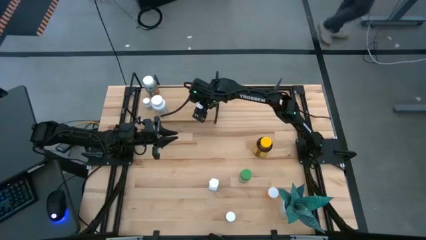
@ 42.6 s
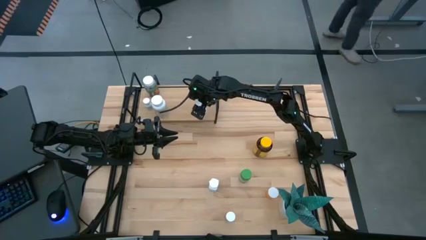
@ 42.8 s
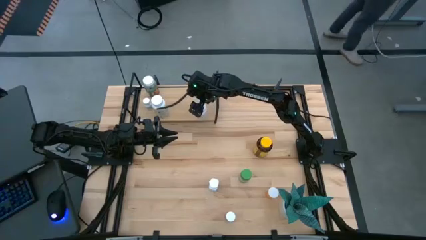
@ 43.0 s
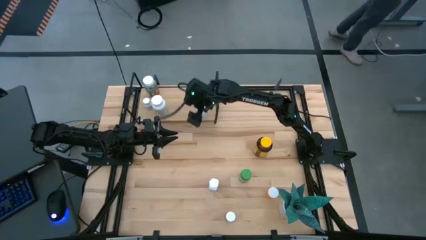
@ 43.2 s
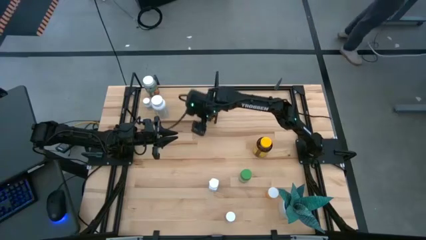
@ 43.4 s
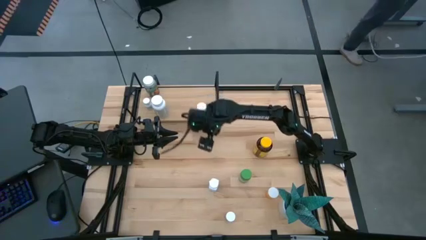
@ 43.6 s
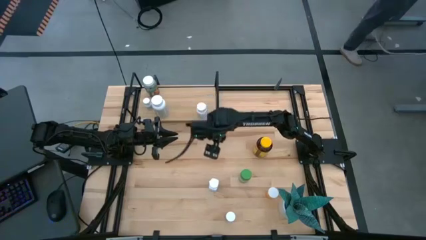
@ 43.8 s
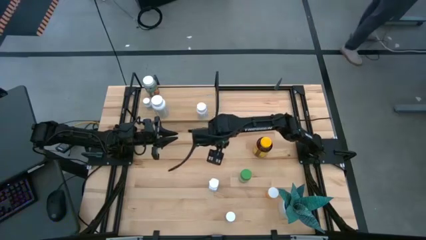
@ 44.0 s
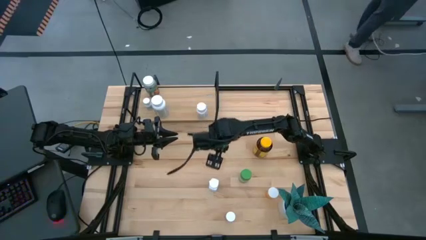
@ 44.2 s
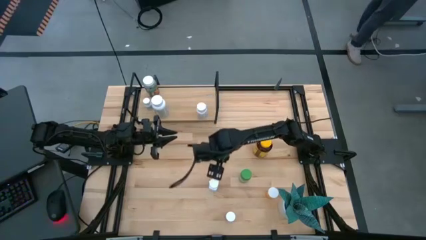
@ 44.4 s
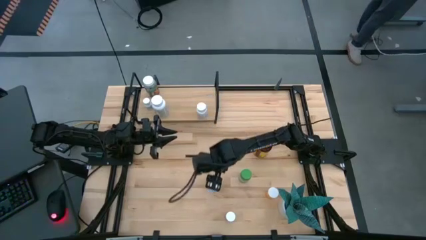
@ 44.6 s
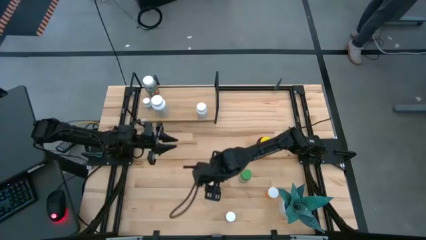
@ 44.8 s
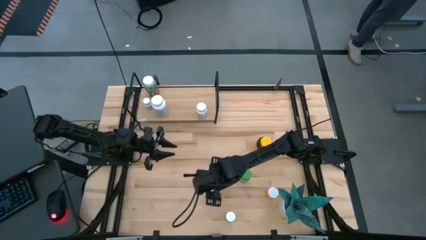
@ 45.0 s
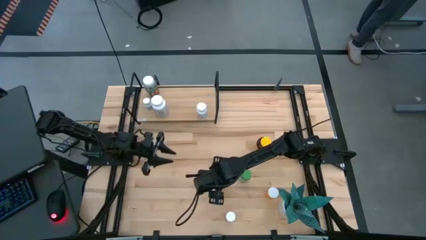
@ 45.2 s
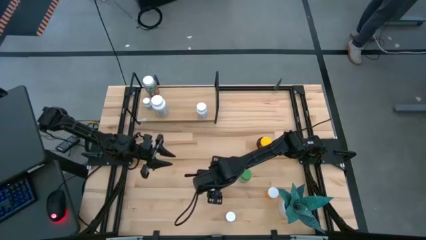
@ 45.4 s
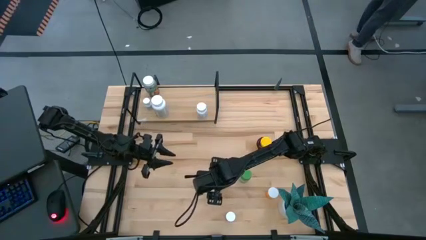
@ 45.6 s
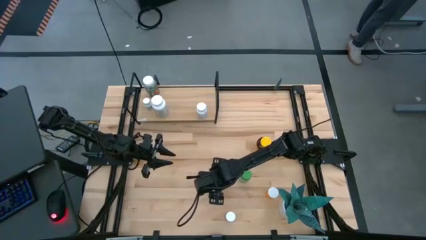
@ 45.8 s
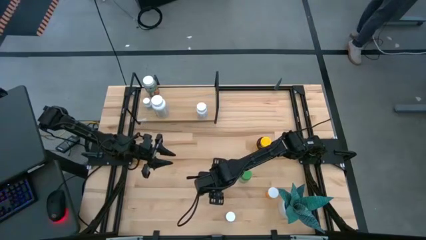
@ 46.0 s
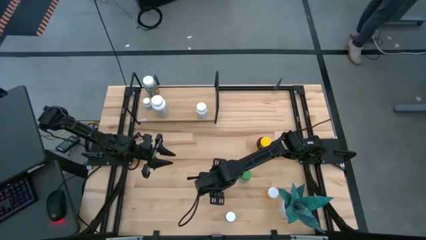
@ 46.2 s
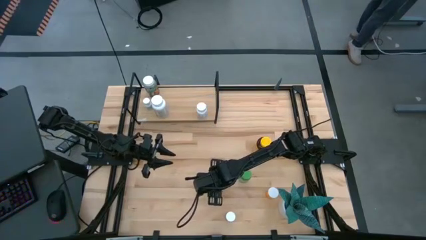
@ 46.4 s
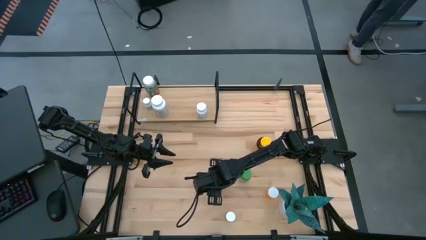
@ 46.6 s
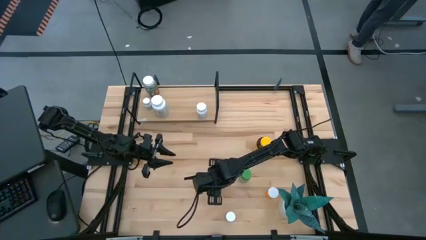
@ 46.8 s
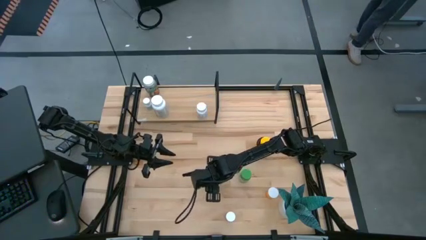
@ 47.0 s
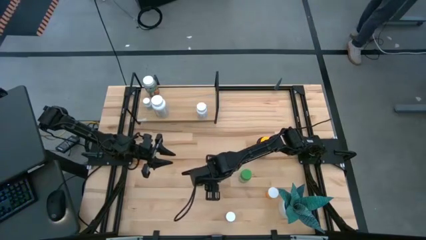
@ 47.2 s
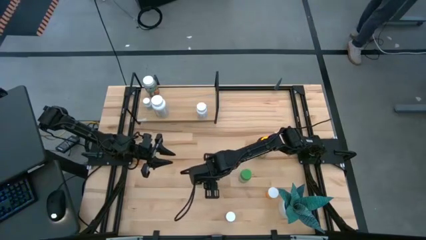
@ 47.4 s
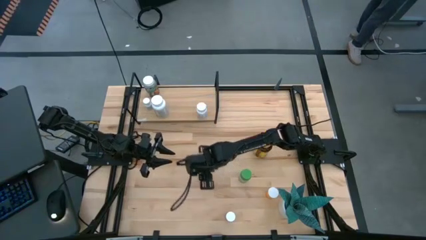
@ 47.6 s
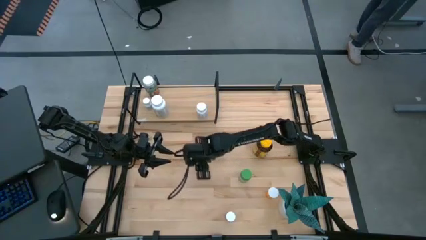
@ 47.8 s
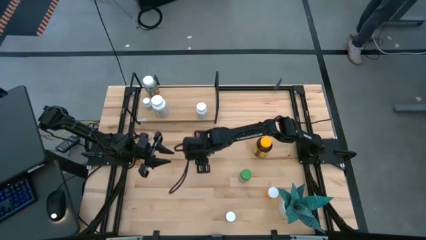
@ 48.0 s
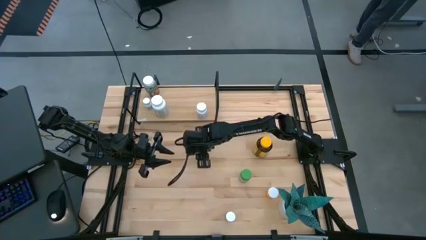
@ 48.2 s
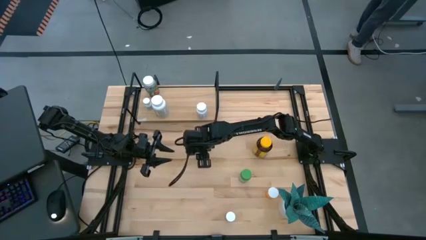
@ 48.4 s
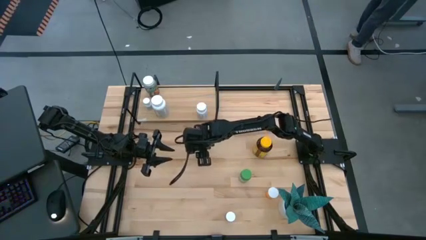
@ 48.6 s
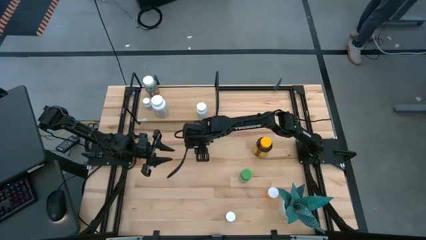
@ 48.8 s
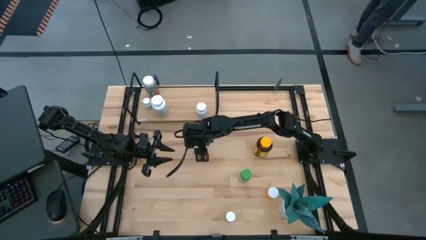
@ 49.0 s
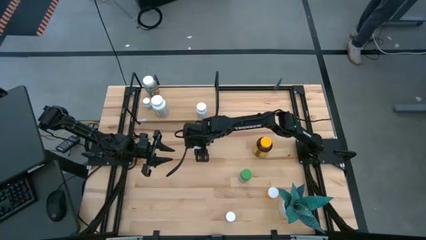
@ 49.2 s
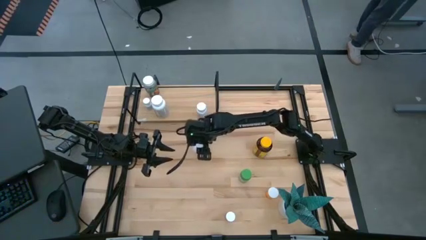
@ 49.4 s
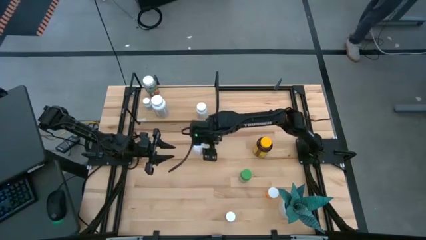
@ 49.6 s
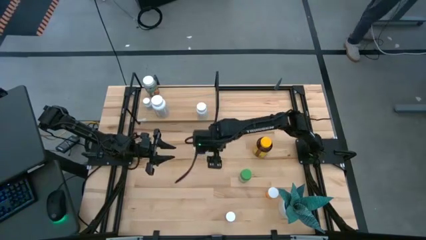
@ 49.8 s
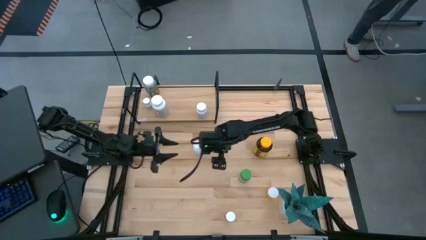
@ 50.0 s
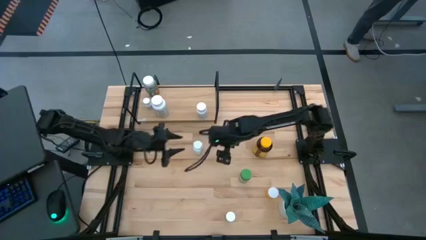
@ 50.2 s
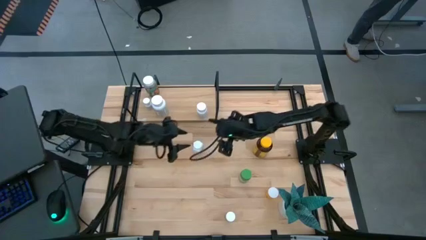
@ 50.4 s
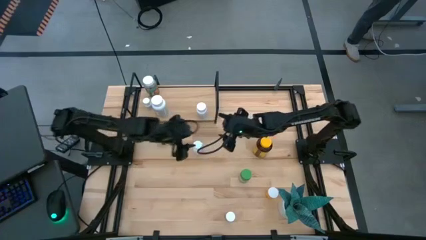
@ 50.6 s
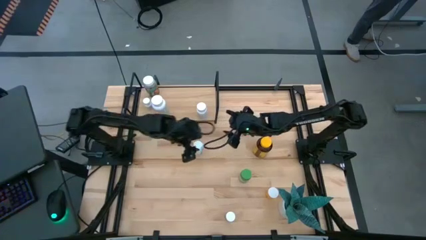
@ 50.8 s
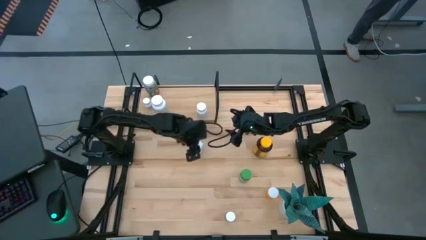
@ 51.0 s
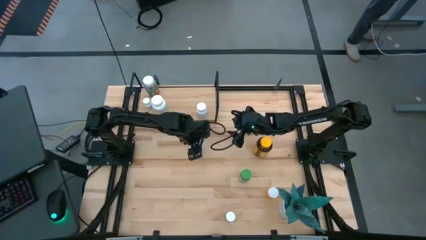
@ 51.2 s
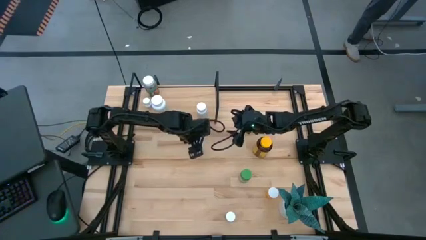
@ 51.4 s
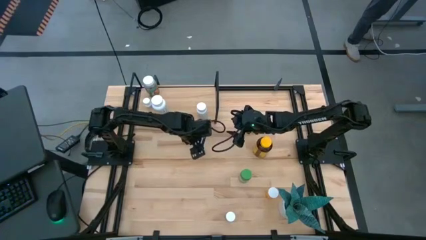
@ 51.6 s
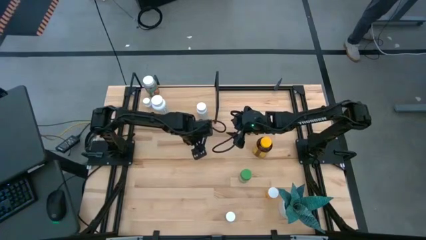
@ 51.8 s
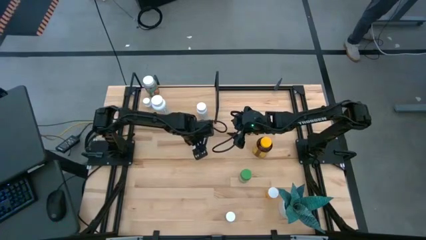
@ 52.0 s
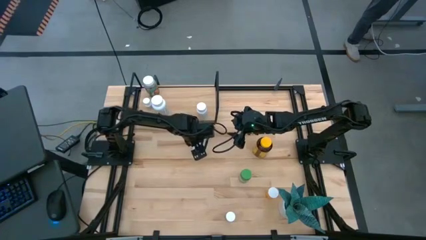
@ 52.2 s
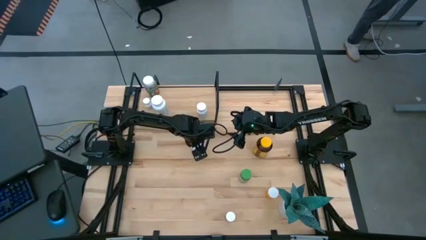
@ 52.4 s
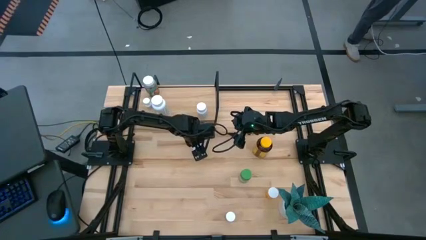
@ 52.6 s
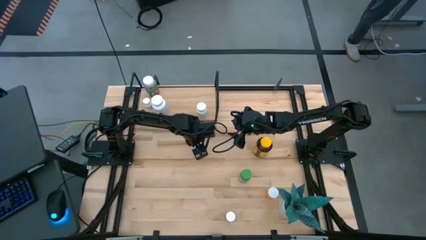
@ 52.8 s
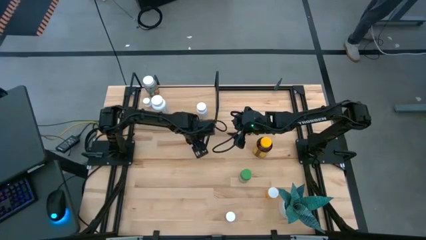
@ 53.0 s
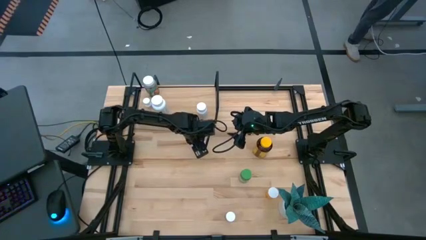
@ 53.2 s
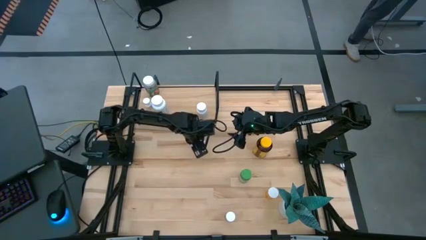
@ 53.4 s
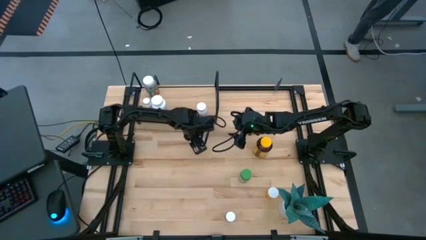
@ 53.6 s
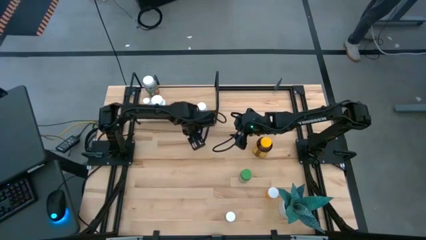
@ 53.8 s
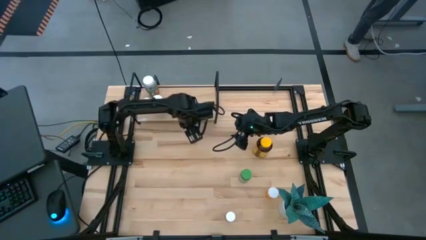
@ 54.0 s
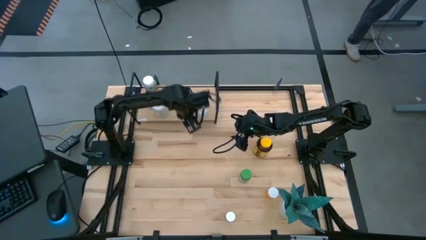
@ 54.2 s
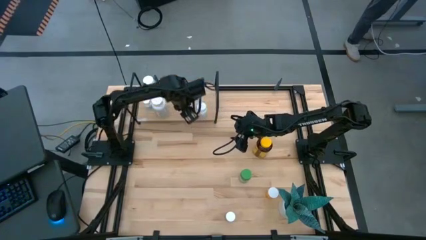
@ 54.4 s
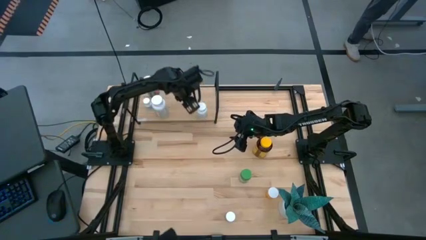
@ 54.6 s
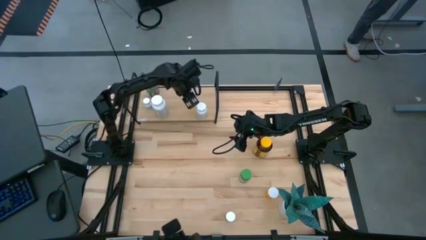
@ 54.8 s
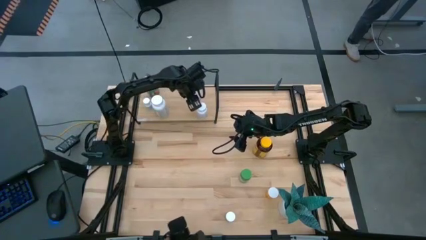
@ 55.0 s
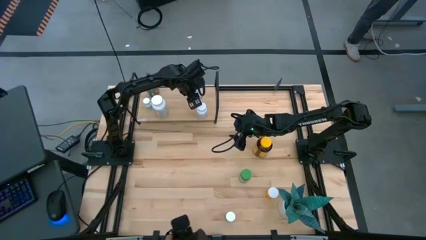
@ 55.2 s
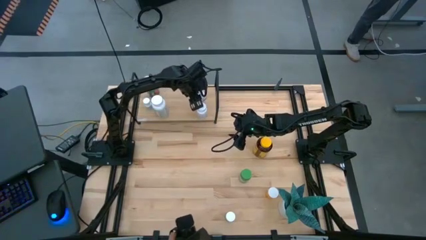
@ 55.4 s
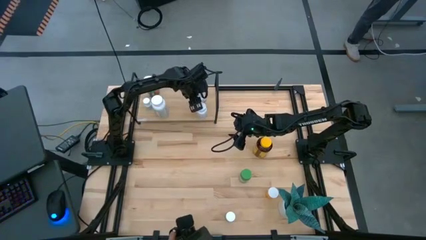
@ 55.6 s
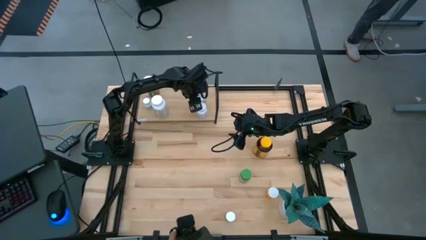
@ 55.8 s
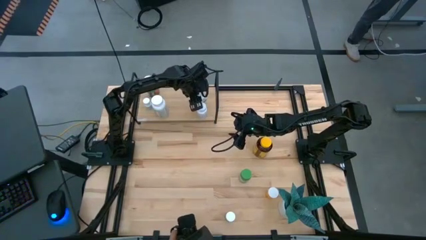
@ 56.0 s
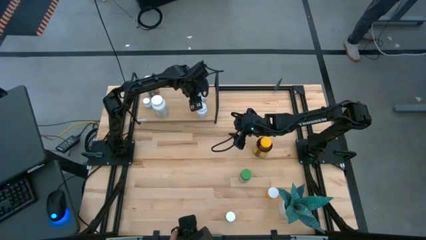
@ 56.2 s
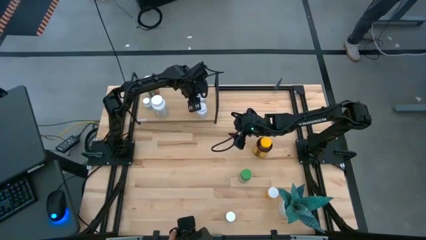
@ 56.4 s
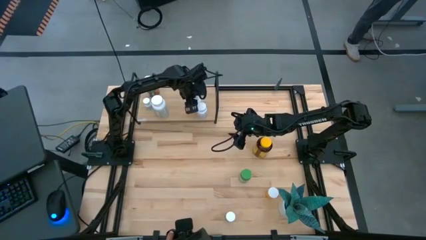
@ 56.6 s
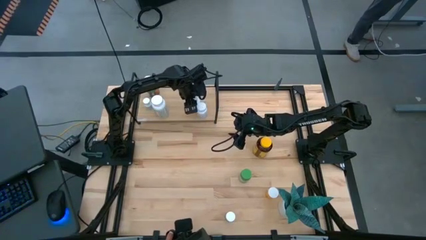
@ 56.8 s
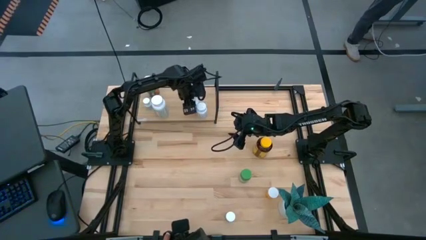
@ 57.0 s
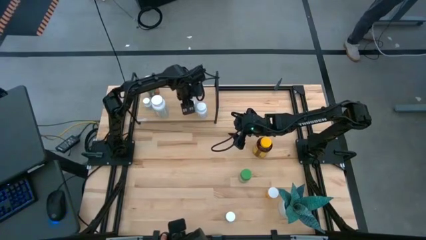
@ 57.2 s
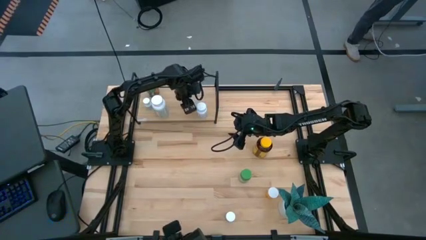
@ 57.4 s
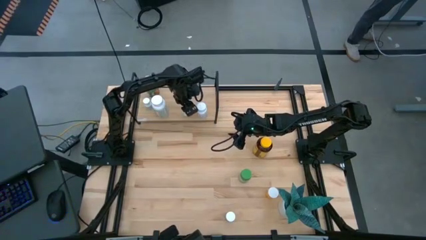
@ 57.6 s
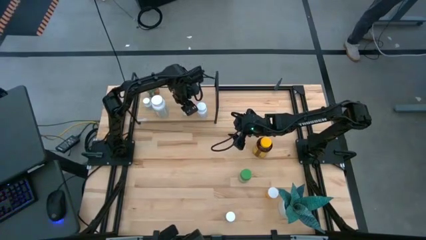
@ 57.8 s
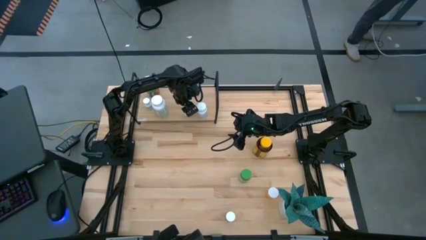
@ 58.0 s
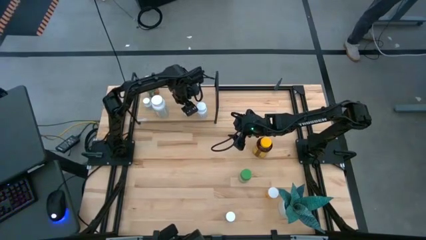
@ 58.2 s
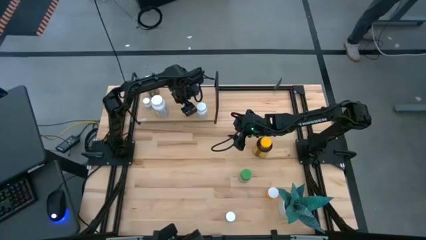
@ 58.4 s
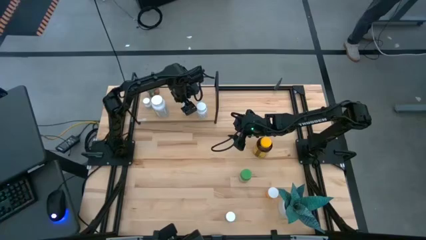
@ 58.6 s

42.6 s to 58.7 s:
Task: Pick and place medicine bottles onto shelf by color
Put the white pill bottle on the shelf
